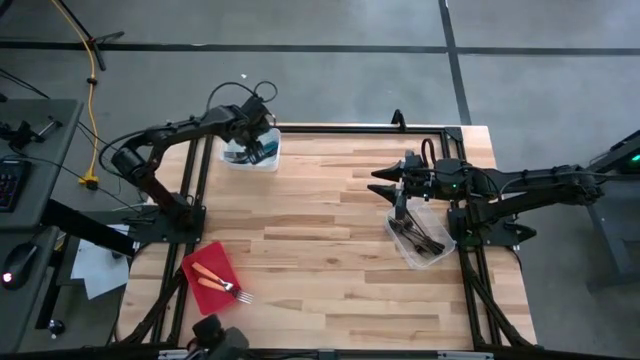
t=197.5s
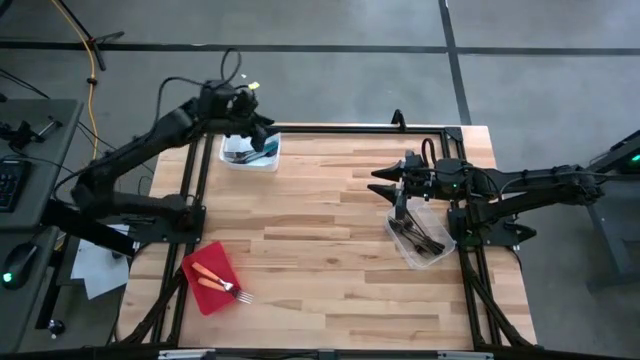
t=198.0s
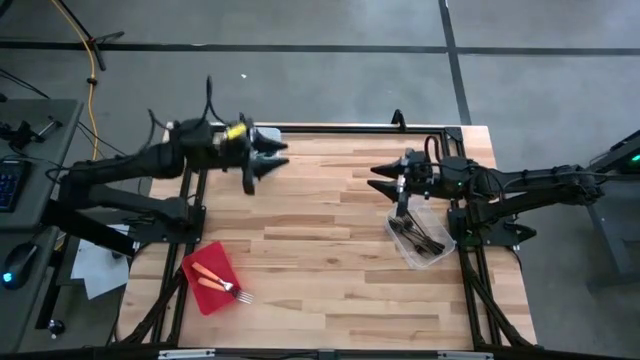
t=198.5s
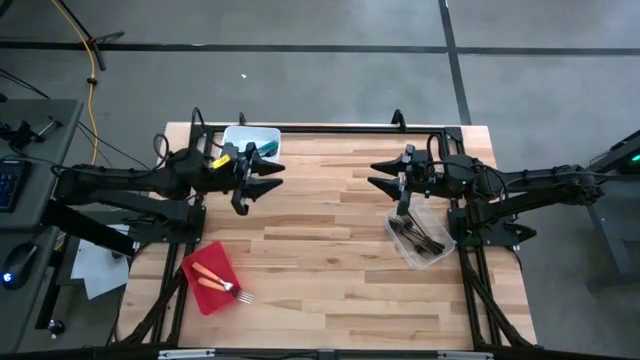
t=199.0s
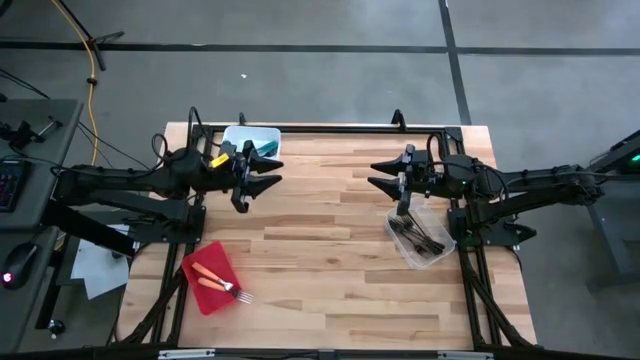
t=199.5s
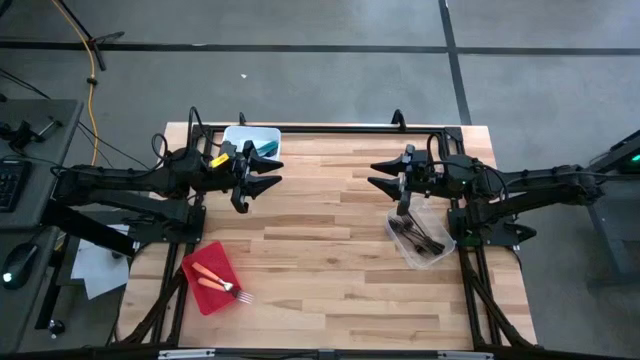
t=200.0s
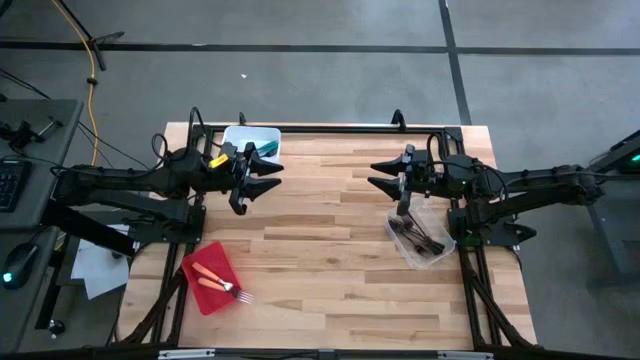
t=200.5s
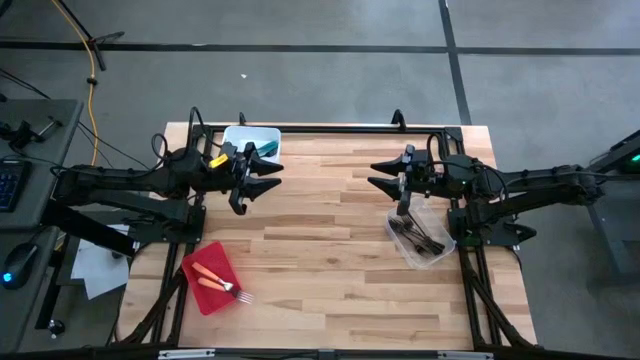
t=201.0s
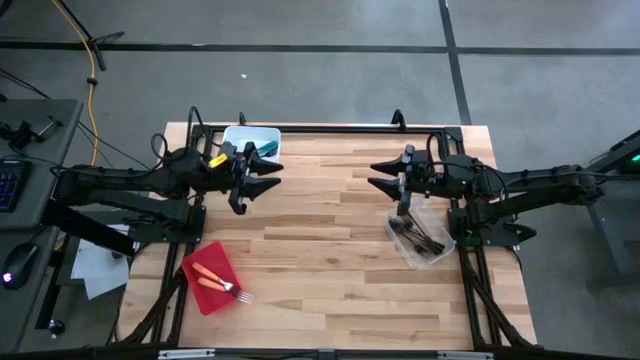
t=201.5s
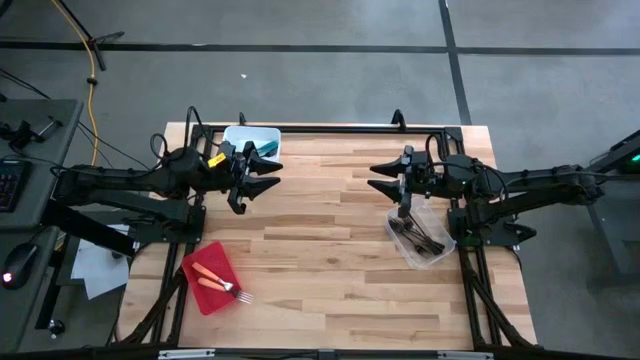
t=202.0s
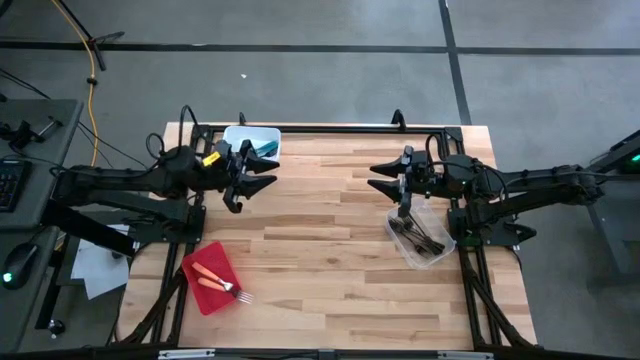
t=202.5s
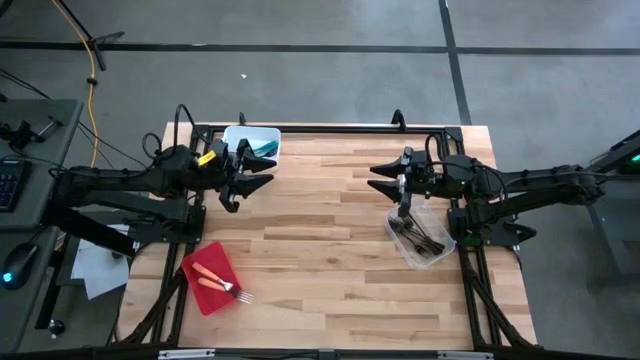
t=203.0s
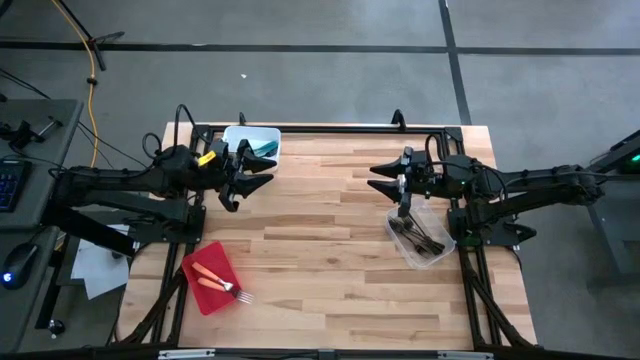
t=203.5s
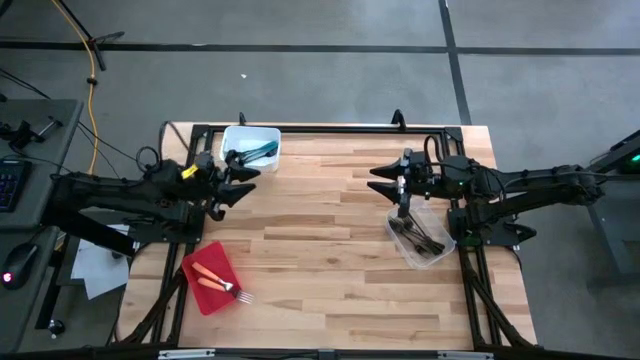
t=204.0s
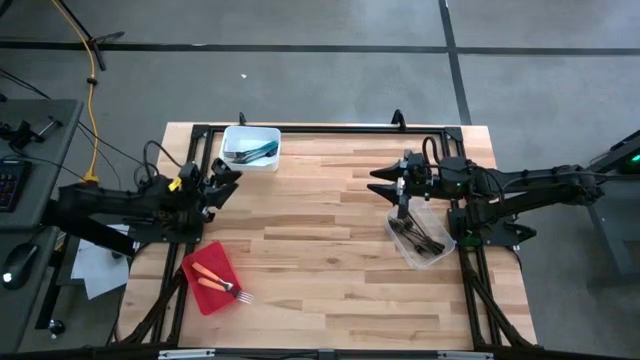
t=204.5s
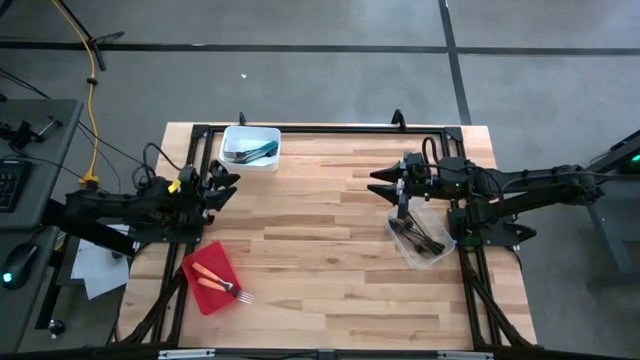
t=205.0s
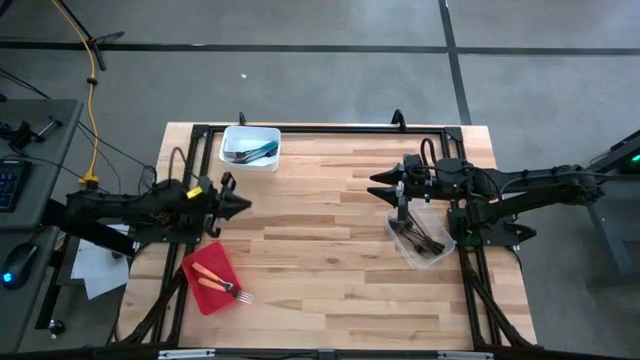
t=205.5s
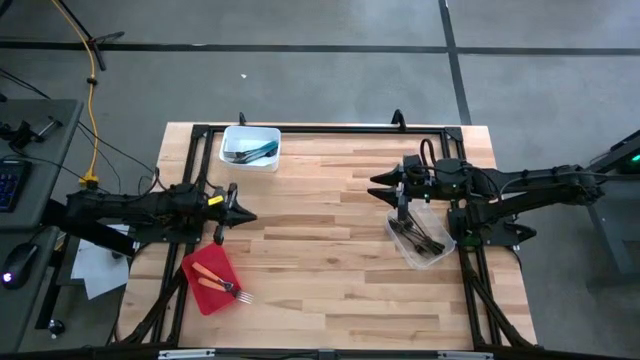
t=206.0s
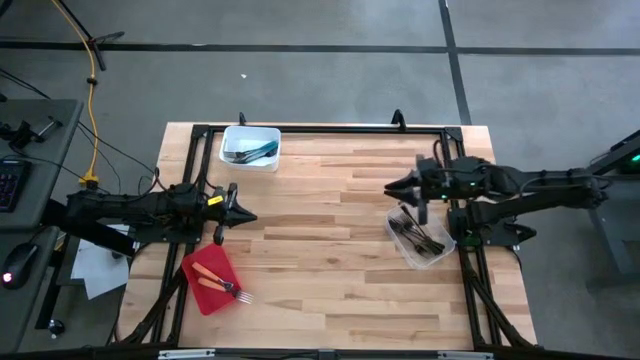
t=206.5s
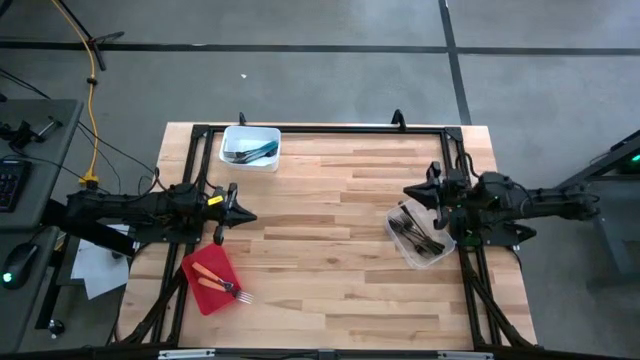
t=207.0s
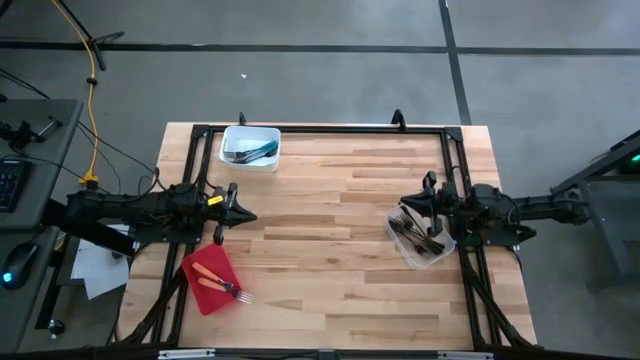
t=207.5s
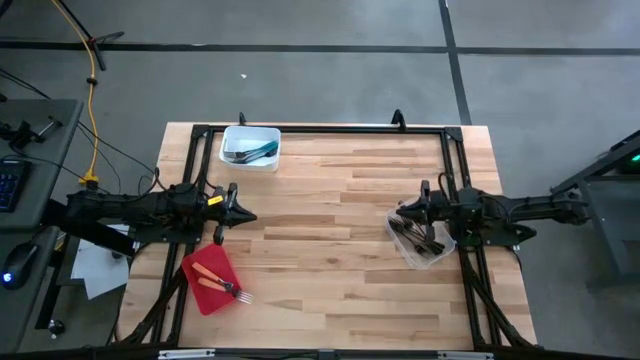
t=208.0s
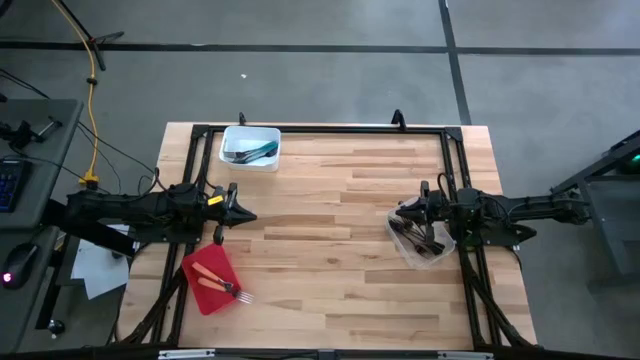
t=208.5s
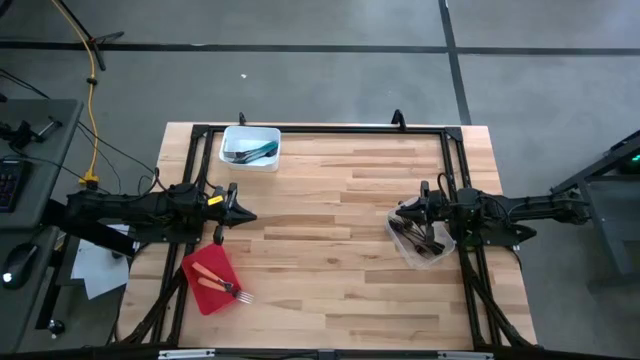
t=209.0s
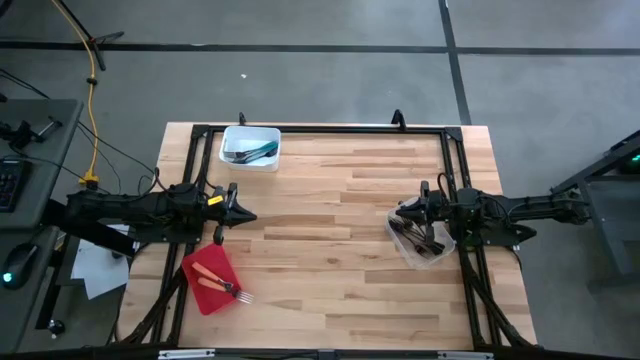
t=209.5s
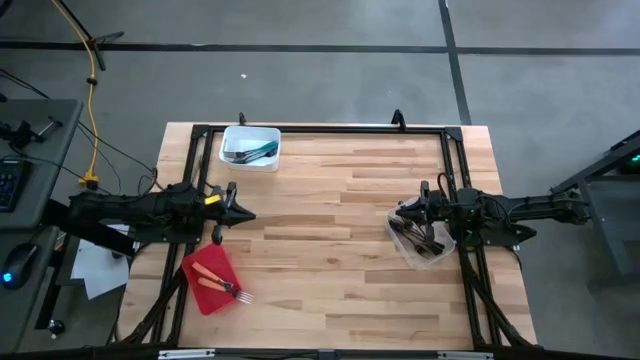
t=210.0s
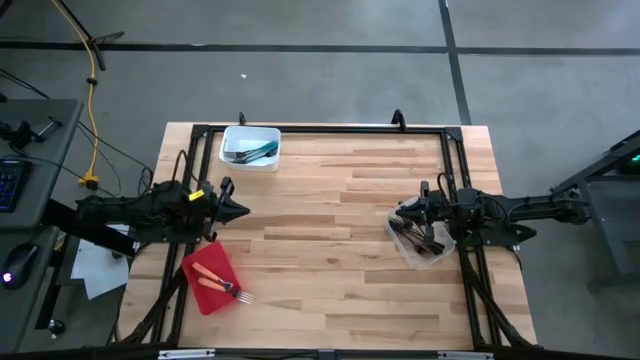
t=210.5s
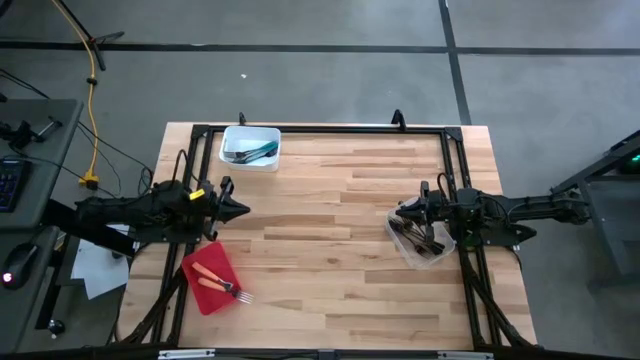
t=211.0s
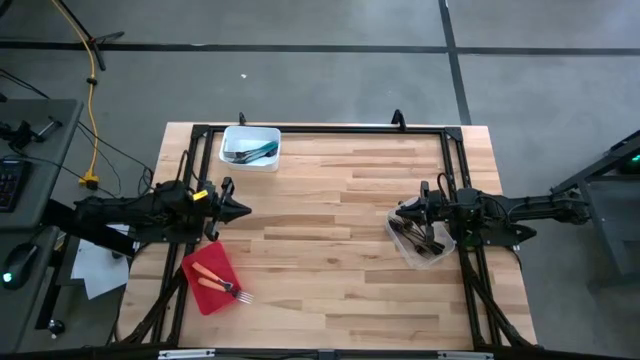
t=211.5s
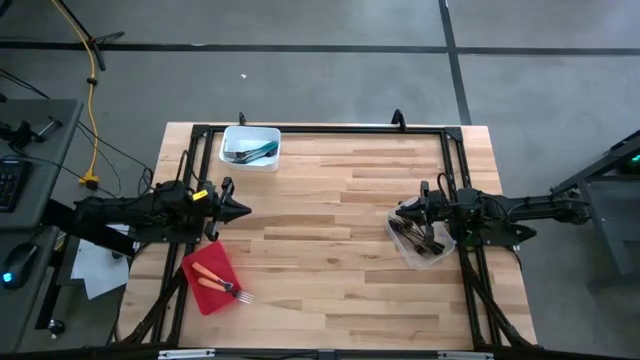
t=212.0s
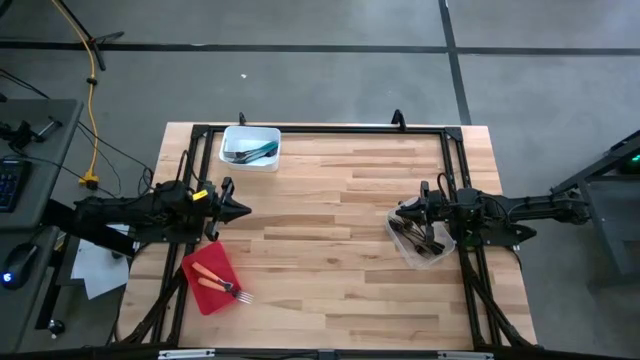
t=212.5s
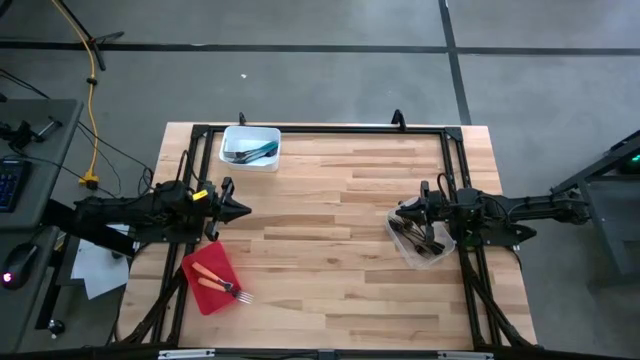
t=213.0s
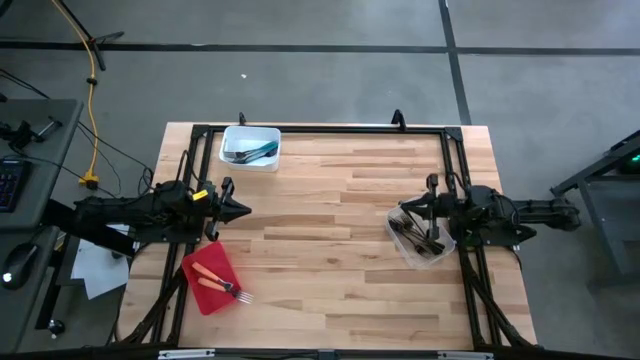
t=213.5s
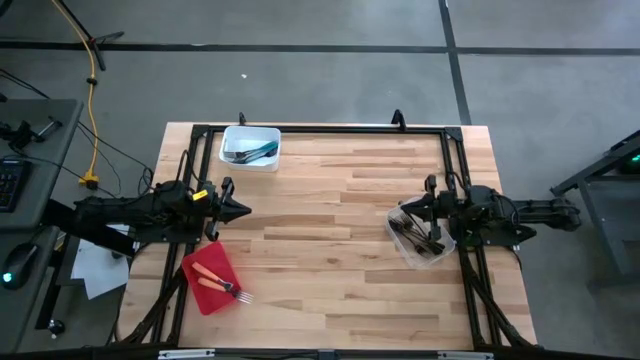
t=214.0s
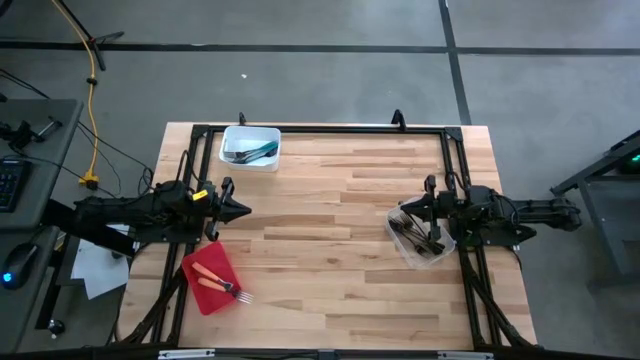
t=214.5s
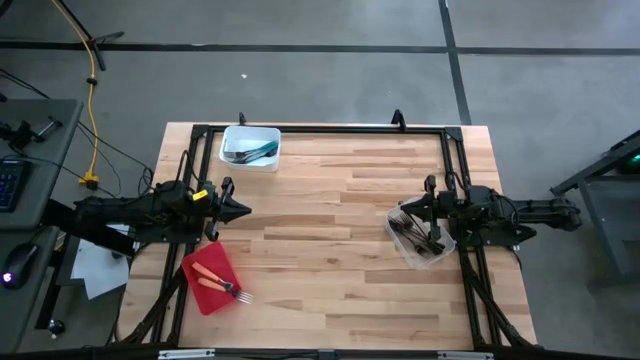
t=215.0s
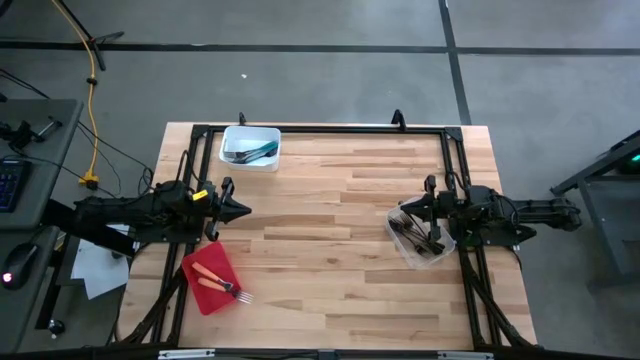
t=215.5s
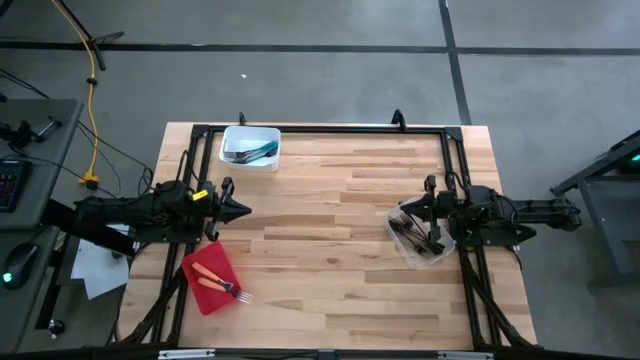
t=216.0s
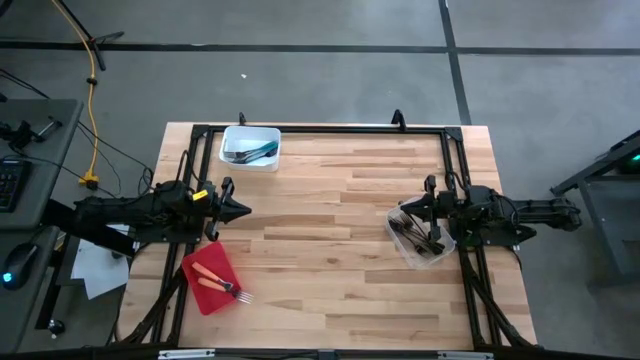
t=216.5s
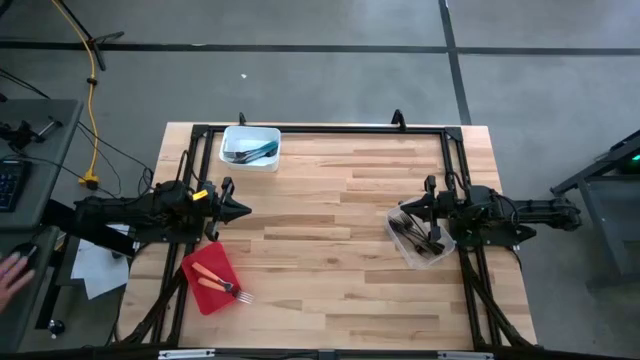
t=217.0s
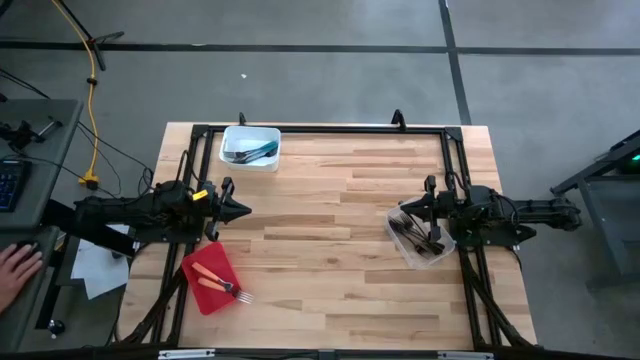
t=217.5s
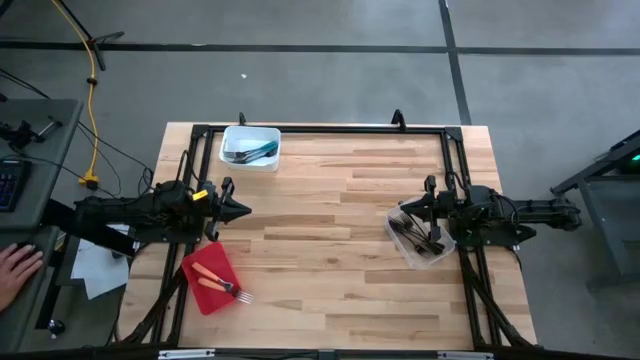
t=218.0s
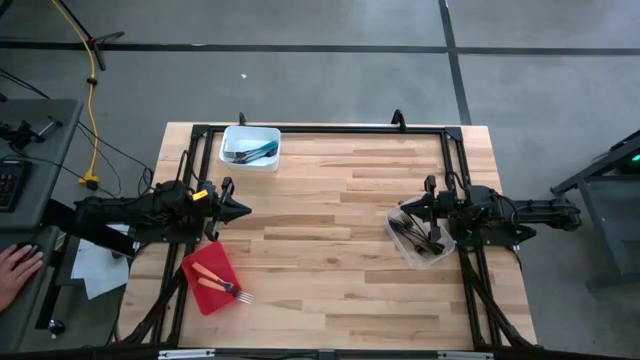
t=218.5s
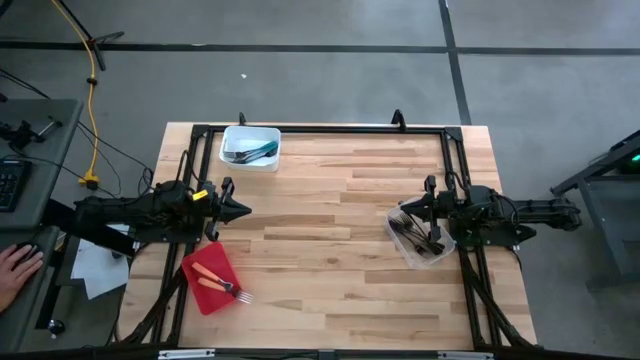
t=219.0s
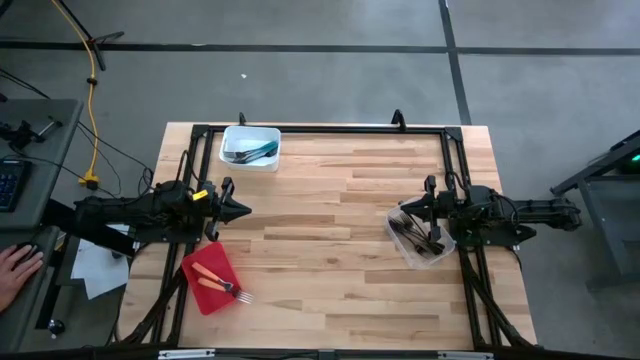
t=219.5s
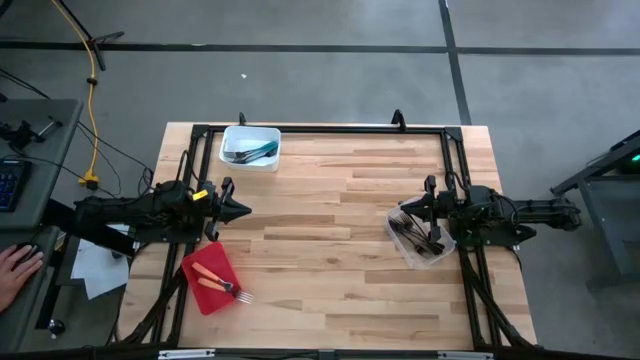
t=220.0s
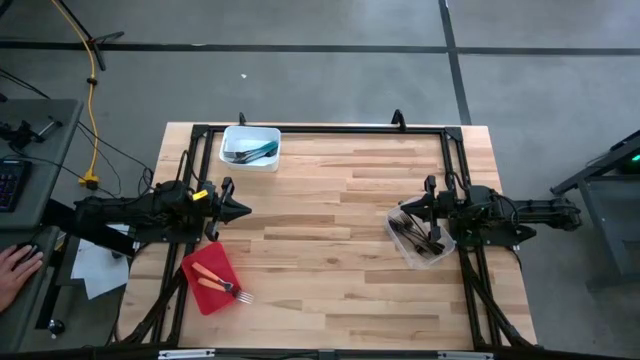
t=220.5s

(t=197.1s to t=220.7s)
Task: Sort silverware by color (type)
Return to Home Position
